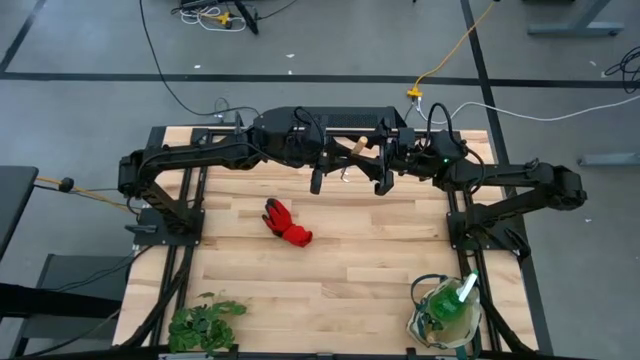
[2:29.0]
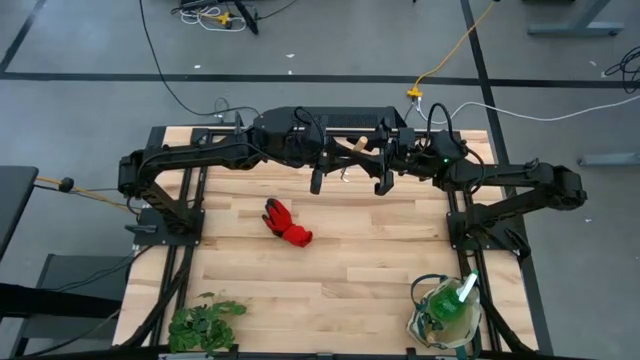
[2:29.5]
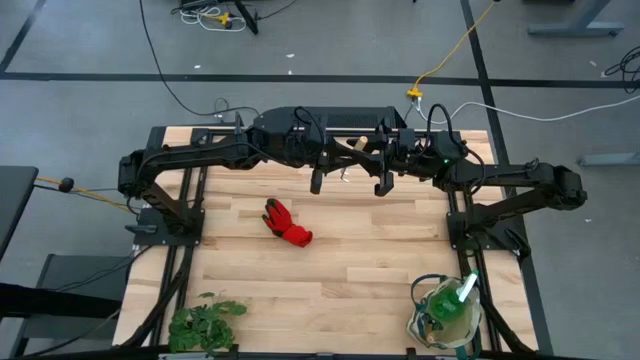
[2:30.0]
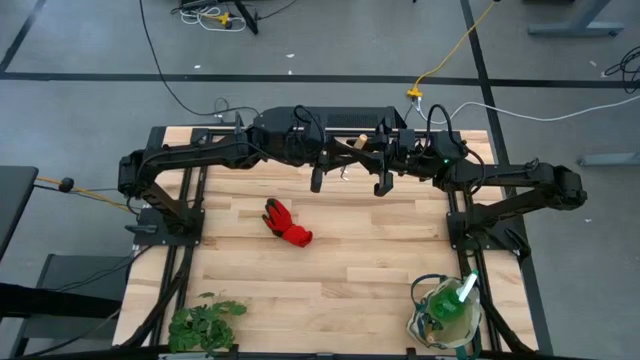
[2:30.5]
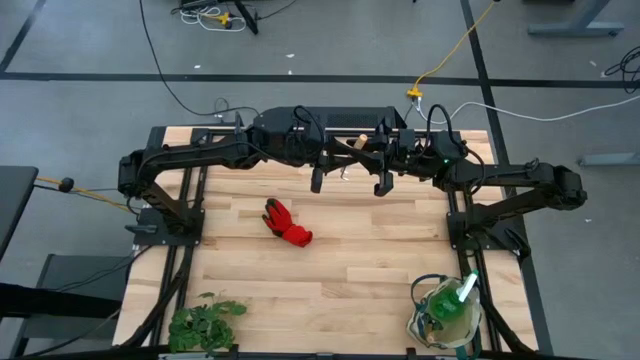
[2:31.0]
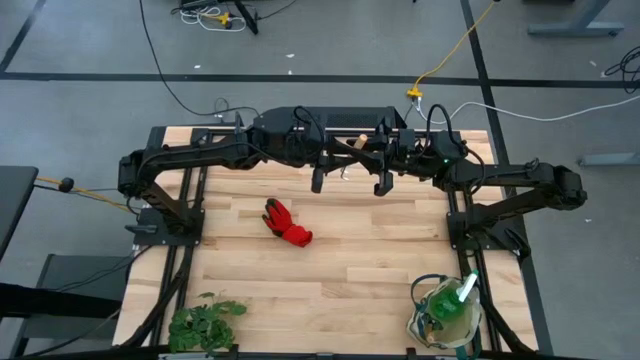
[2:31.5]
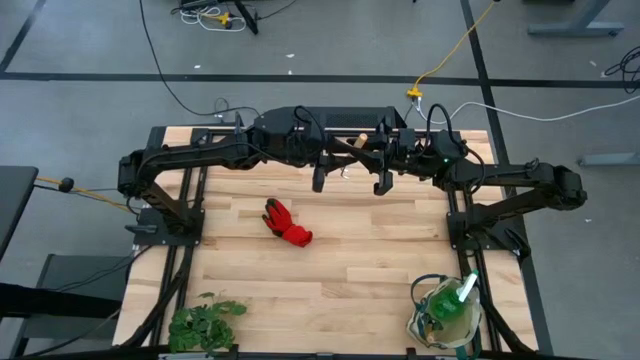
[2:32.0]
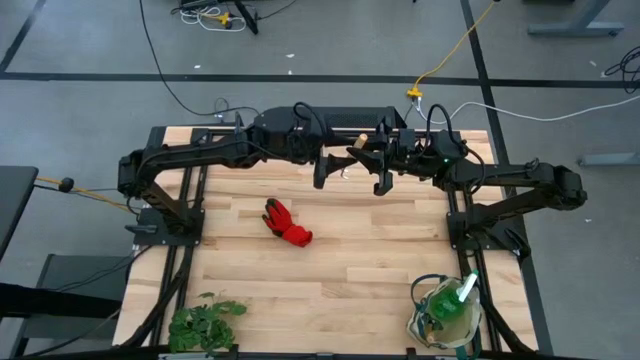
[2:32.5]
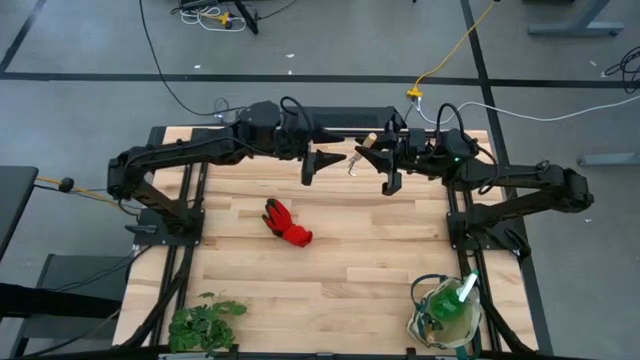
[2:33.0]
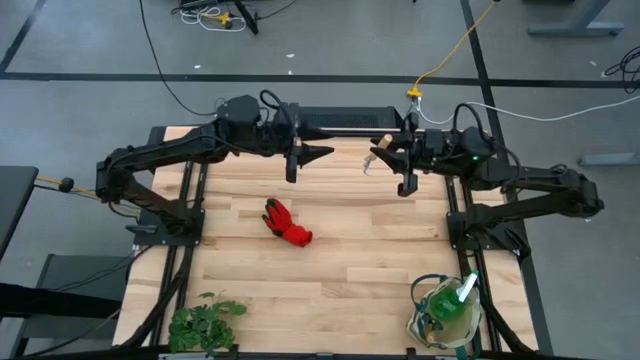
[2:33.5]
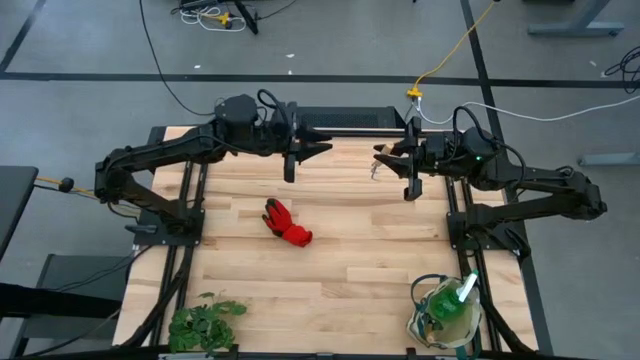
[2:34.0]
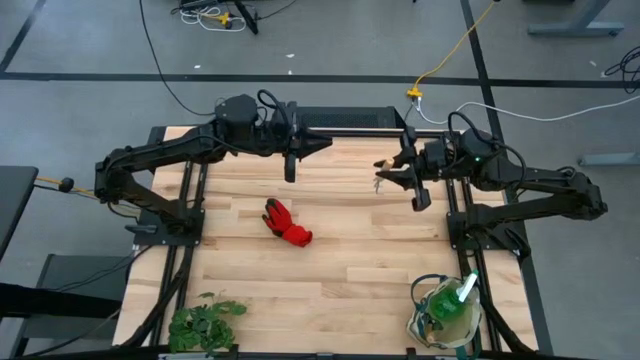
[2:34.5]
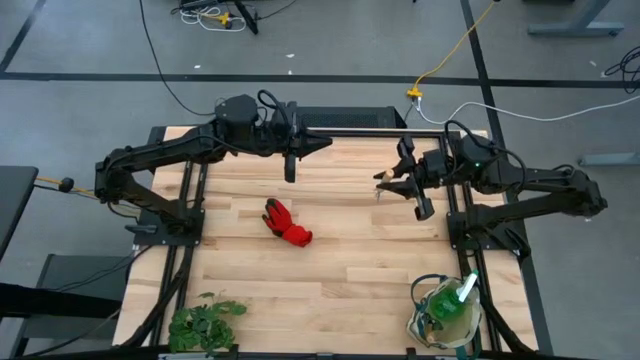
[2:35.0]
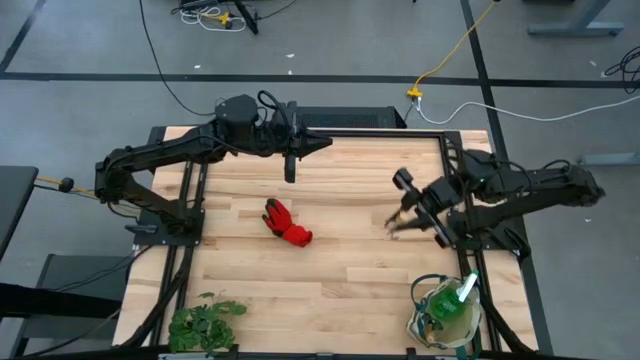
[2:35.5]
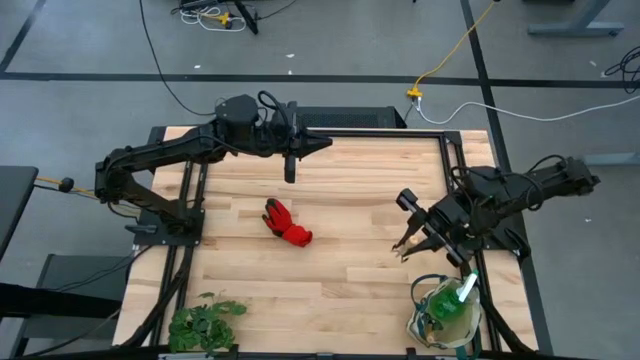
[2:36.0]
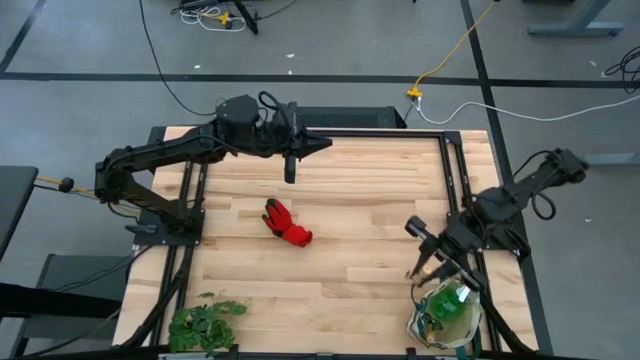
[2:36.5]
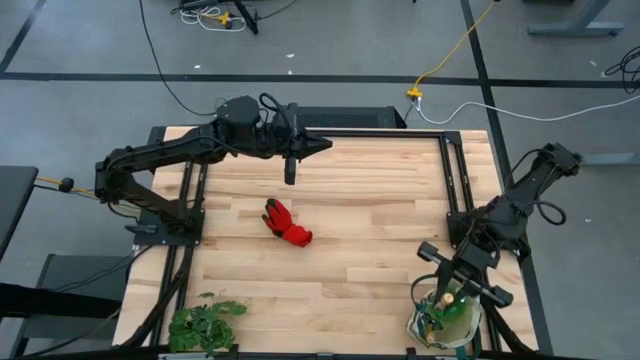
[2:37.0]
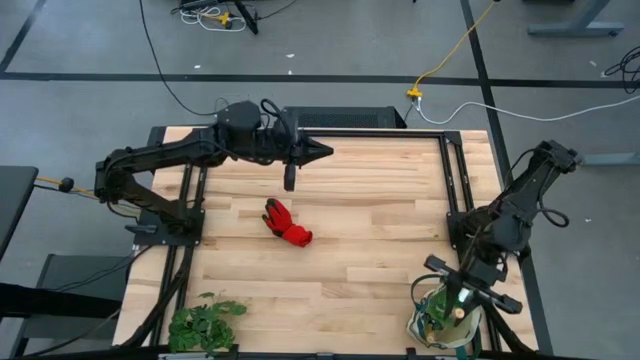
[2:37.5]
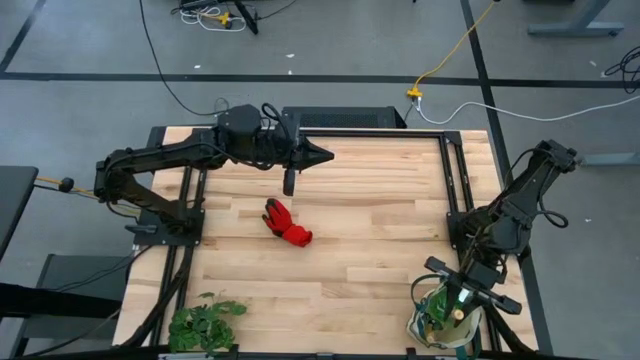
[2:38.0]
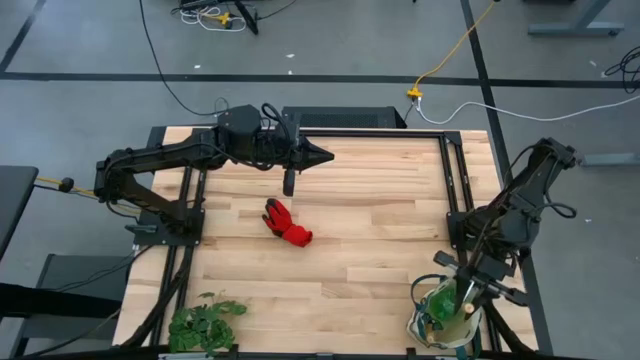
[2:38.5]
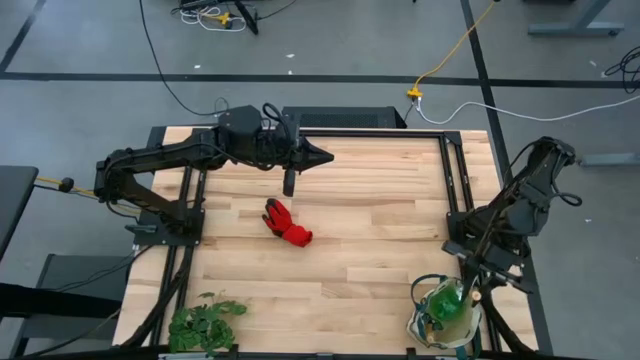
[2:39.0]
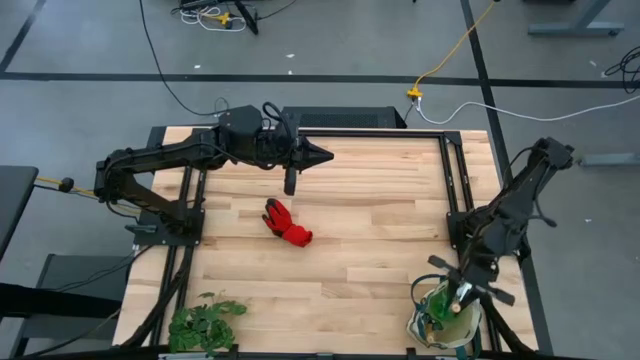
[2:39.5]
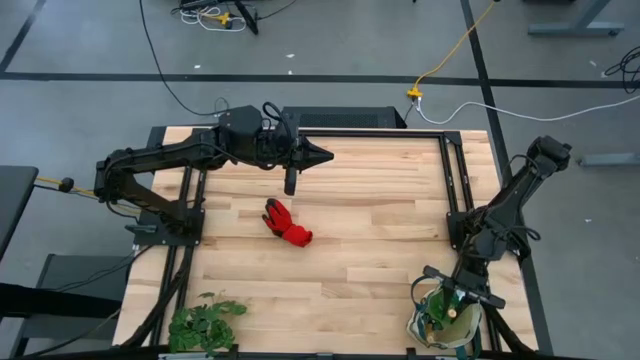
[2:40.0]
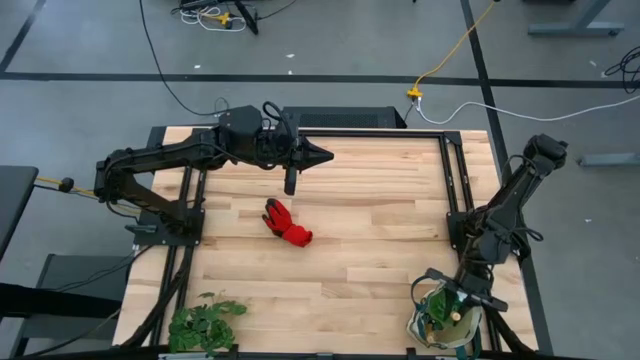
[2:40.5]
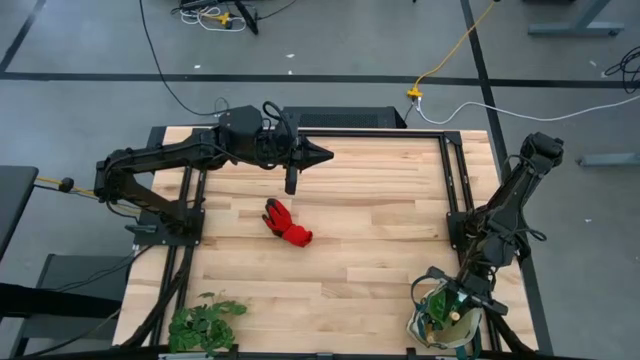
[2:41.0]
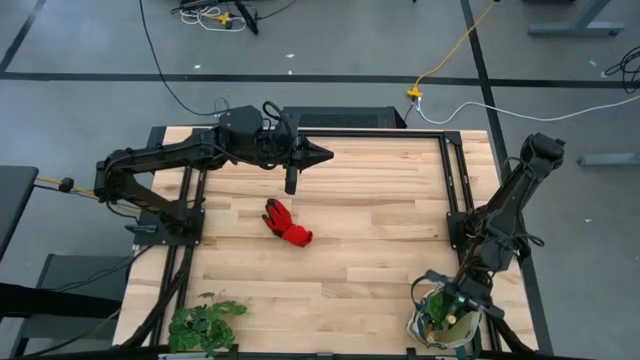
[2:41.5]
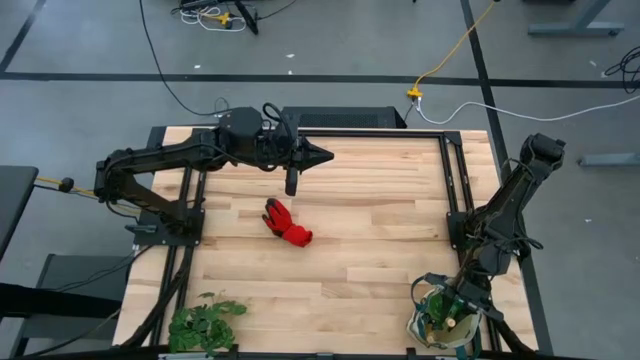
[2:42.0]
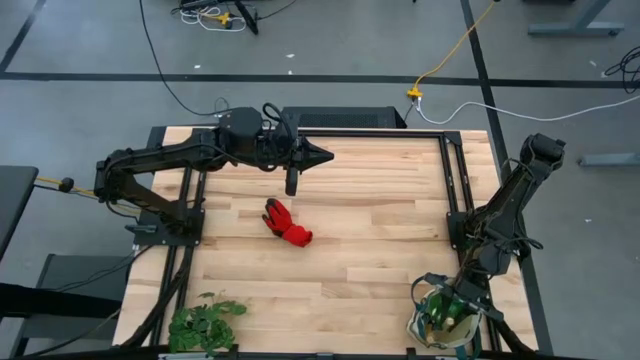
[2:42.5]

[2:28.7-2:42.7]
Task: Pick & Place Garden tools in Gardening bag
Put the hand rake into the gardening bag

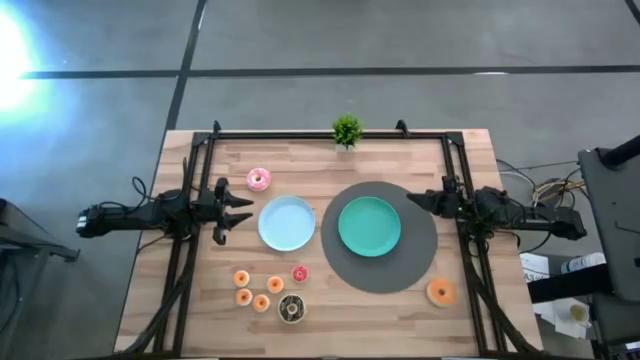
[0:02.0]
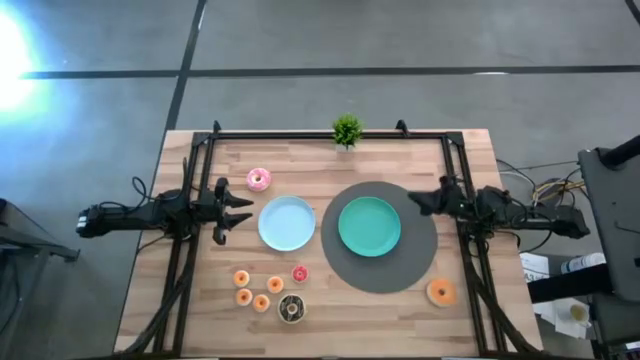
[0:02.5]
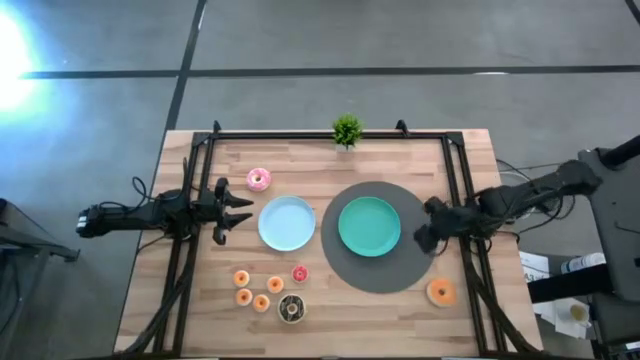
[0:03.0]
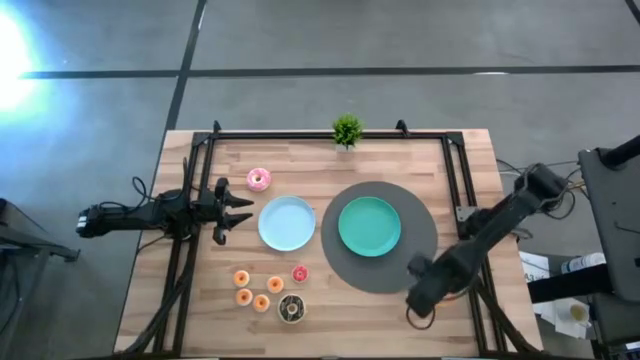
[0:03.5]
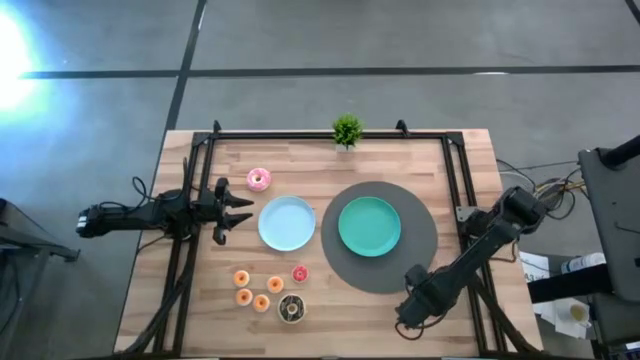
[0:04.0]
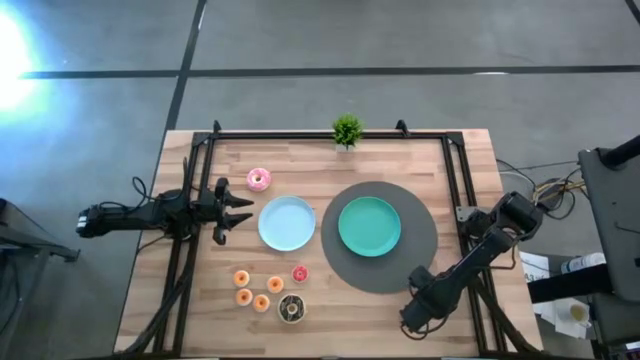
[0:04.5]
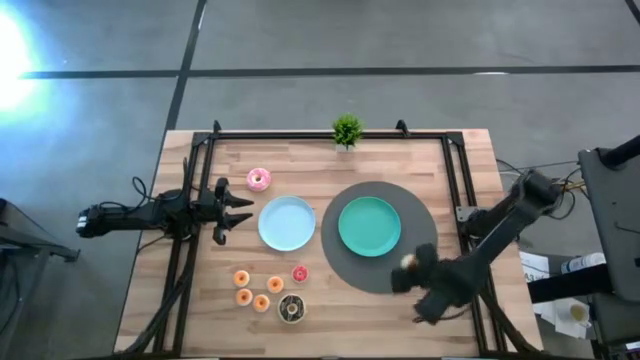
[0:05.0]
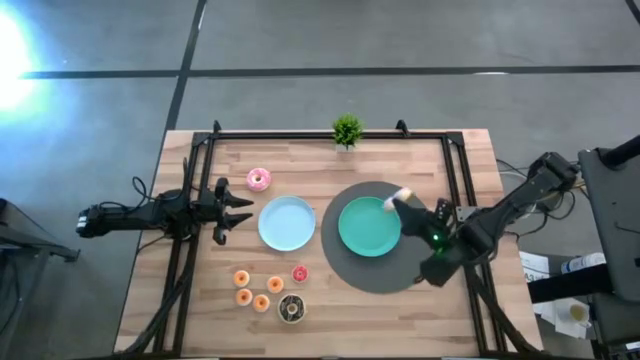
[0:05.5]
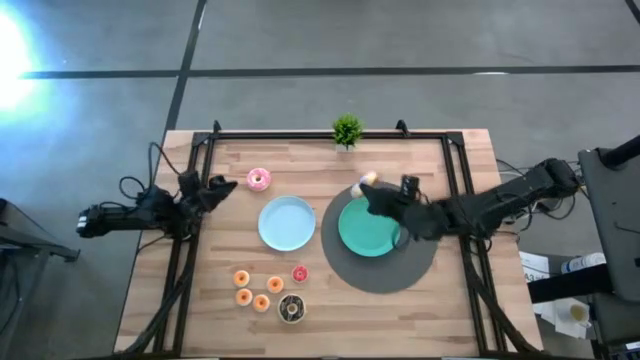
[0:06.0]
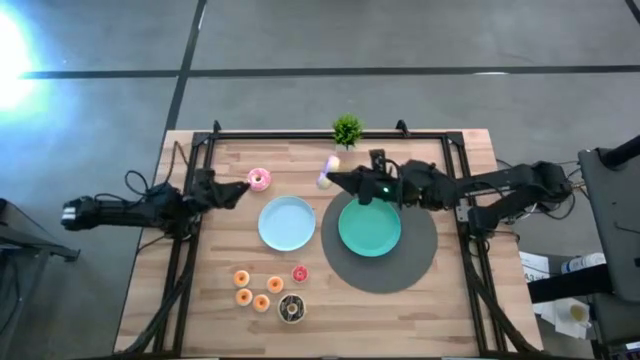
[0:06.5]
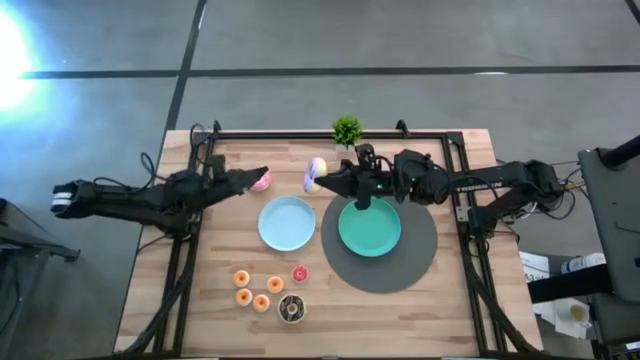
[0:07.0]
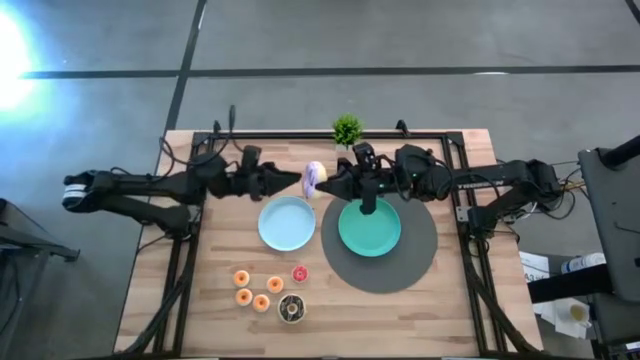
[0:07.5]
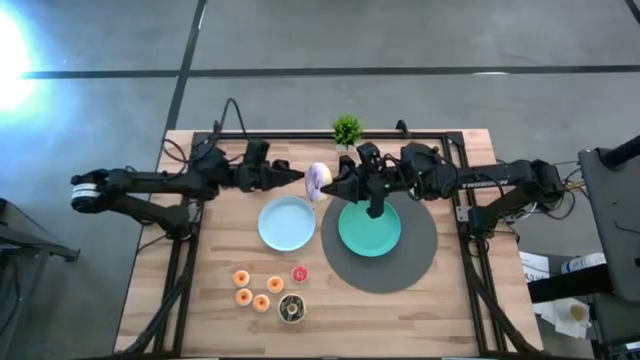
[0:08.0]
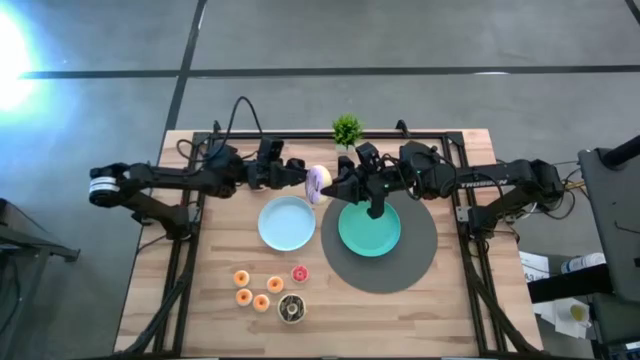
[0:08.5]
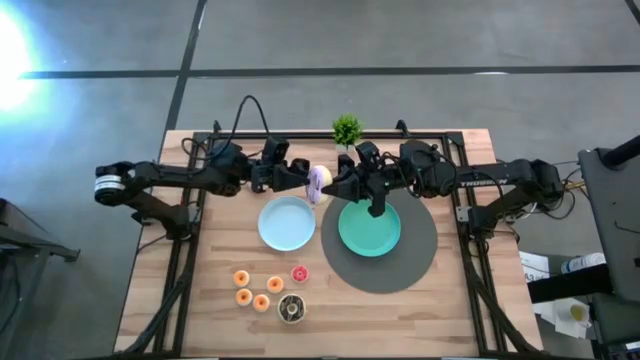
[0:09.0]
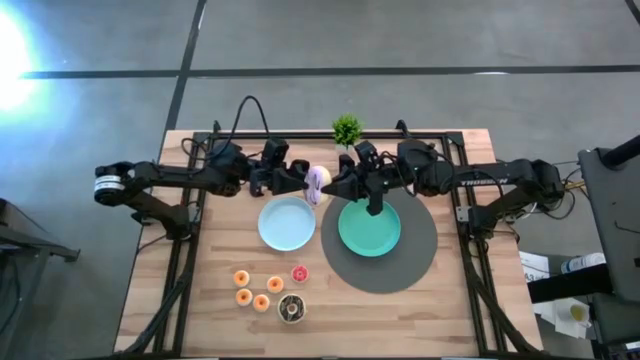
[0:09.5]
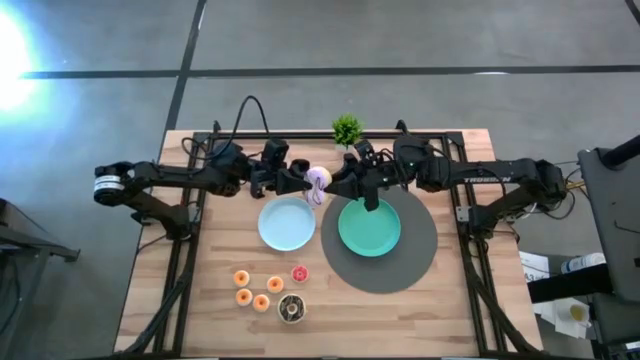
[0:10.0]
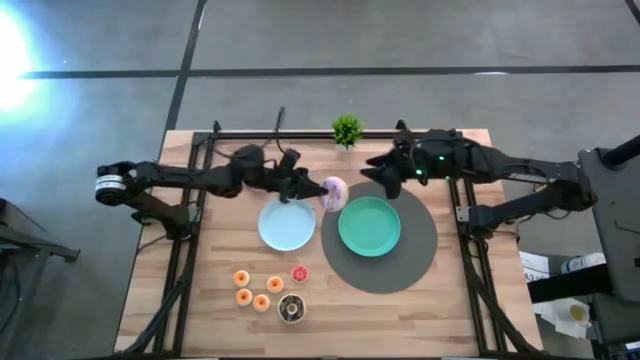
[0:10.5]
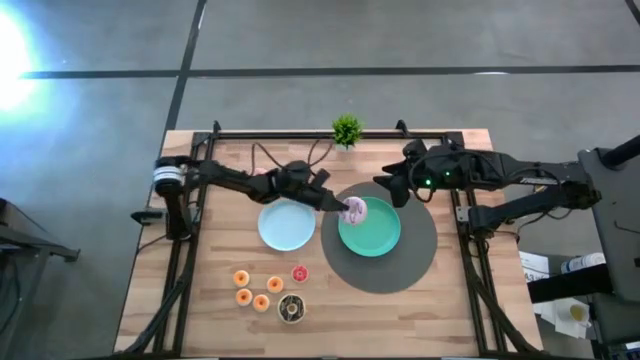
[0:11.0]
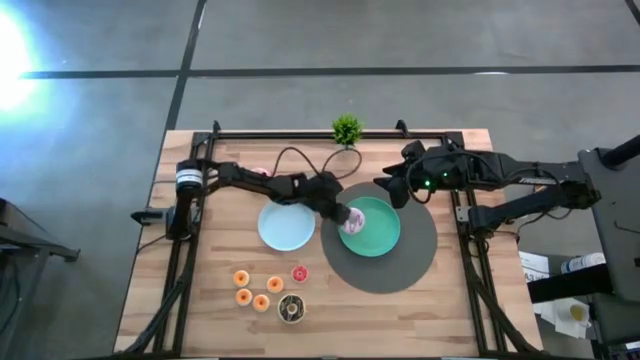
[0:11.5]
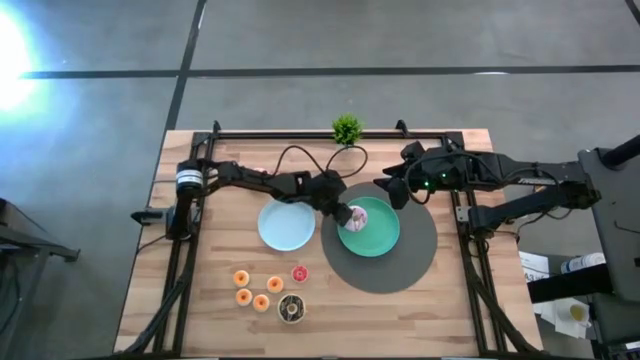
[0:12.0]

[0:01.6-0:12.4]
Task: Pick & Place donuts
Put the large light purple donut on the light green plate
